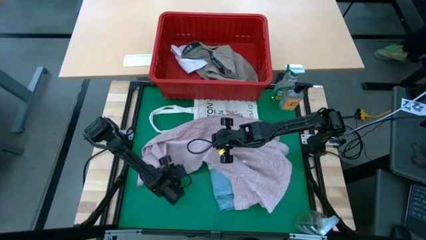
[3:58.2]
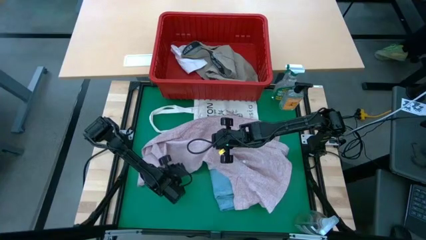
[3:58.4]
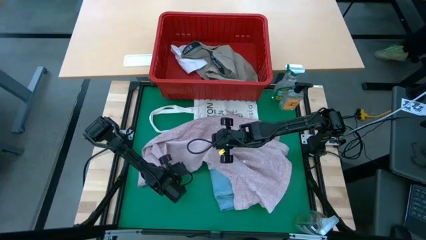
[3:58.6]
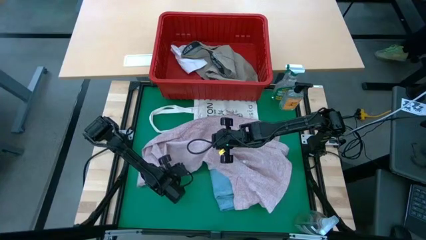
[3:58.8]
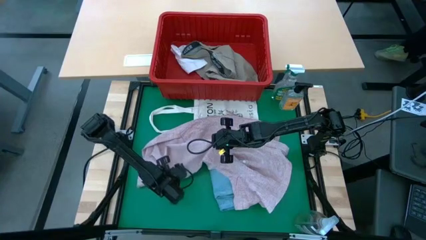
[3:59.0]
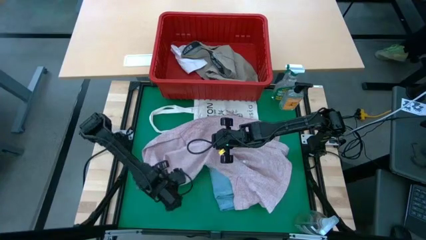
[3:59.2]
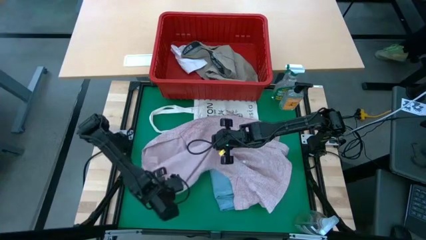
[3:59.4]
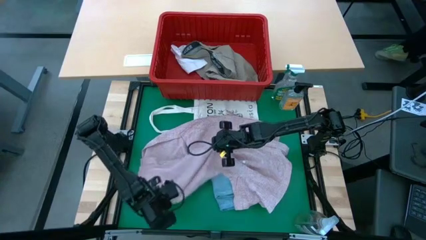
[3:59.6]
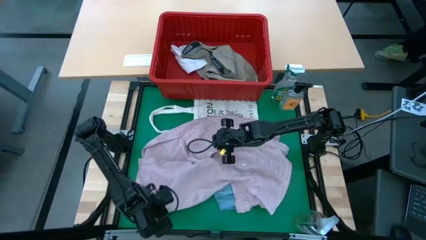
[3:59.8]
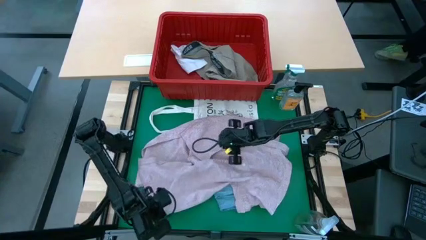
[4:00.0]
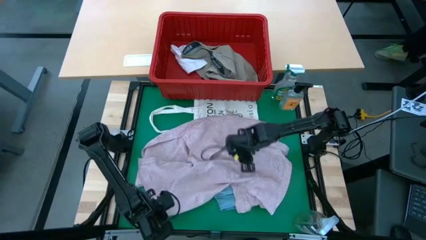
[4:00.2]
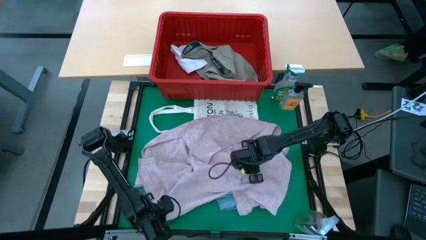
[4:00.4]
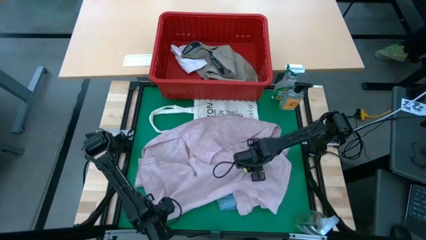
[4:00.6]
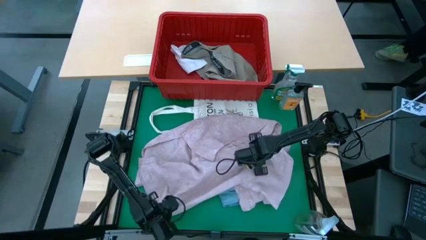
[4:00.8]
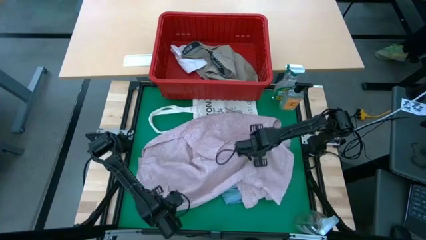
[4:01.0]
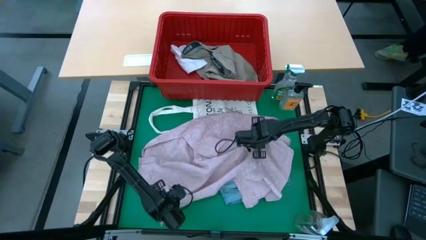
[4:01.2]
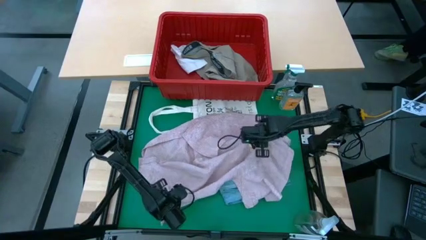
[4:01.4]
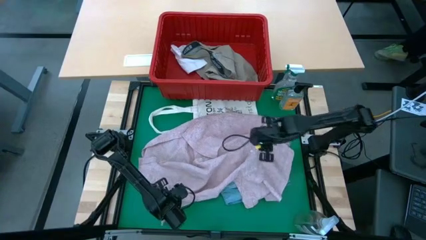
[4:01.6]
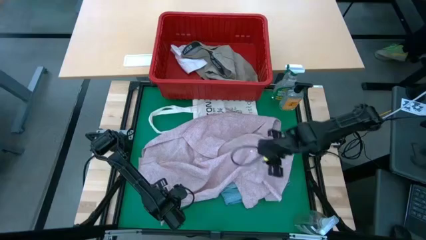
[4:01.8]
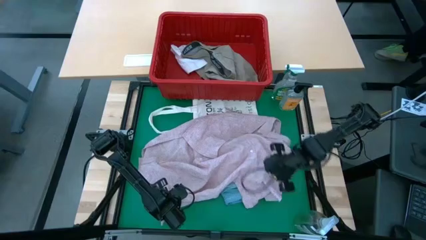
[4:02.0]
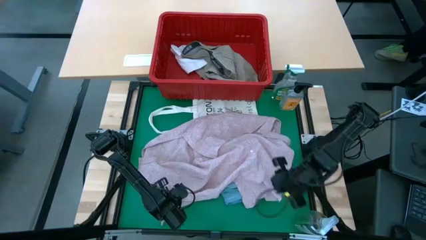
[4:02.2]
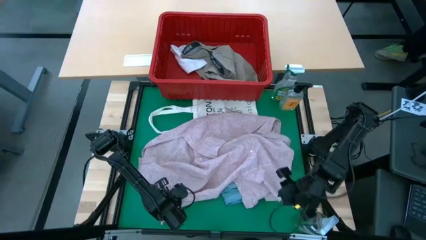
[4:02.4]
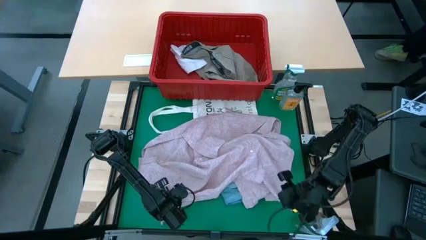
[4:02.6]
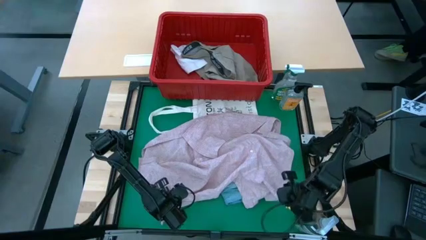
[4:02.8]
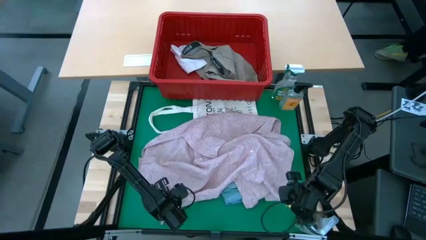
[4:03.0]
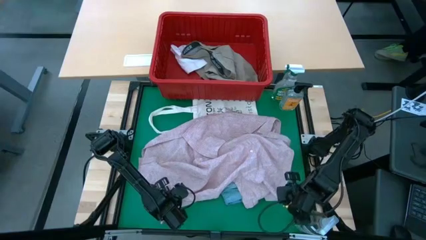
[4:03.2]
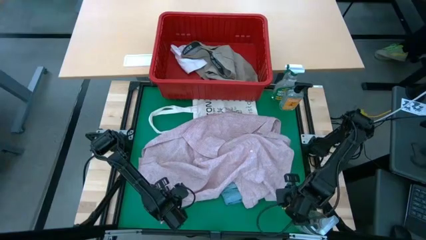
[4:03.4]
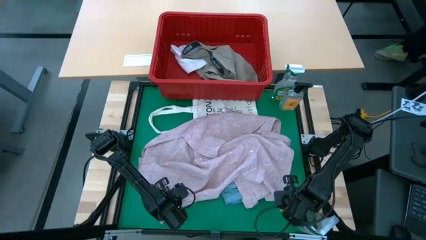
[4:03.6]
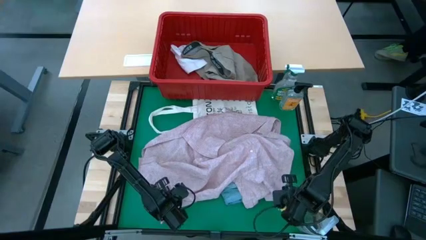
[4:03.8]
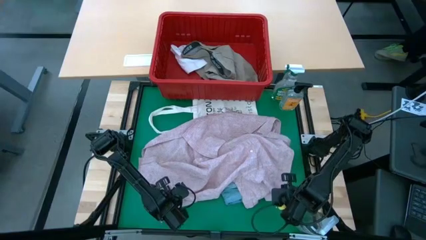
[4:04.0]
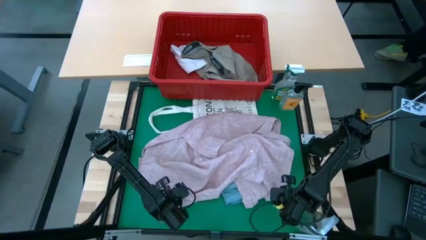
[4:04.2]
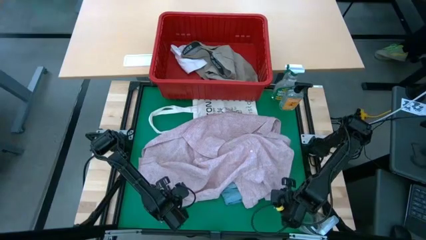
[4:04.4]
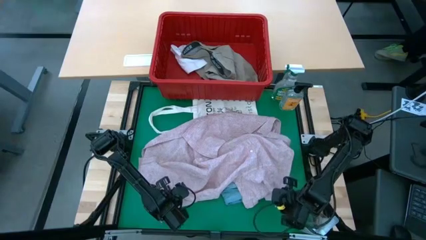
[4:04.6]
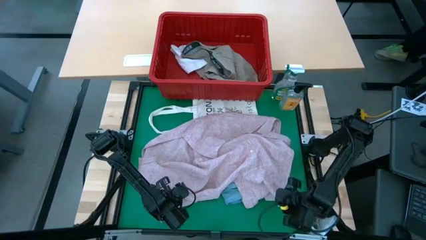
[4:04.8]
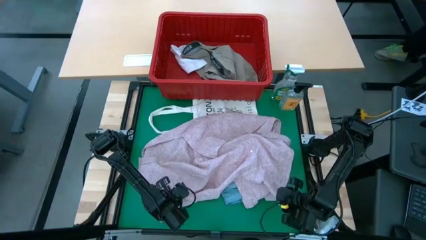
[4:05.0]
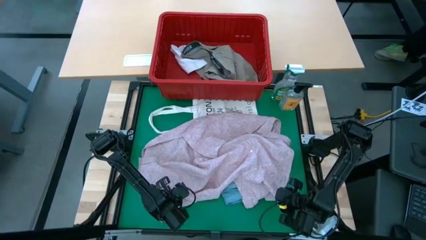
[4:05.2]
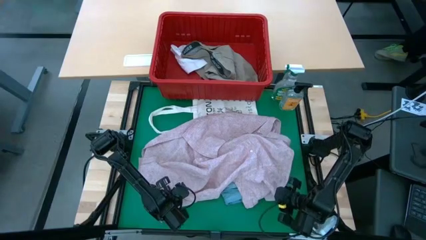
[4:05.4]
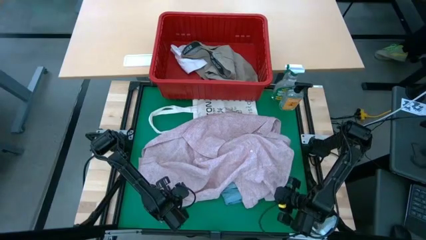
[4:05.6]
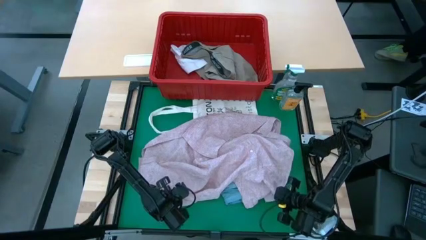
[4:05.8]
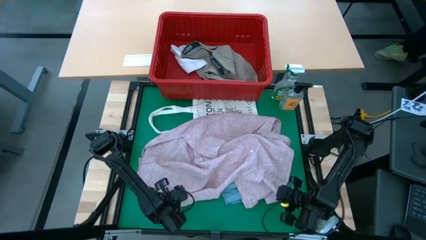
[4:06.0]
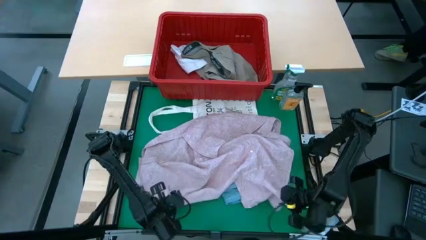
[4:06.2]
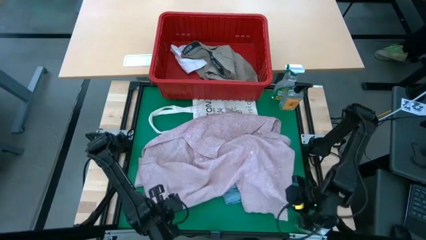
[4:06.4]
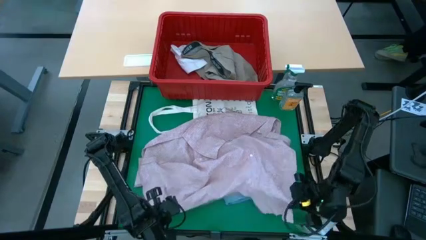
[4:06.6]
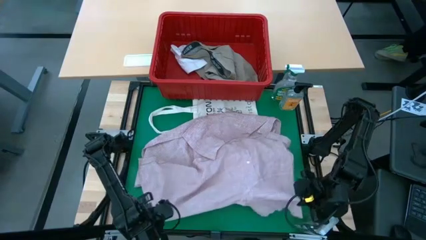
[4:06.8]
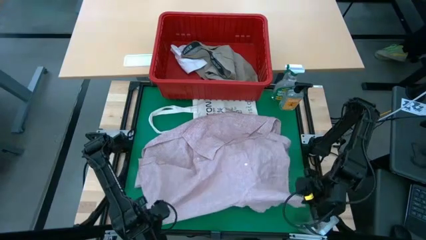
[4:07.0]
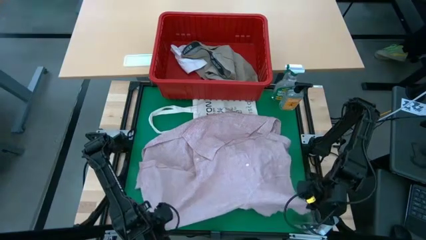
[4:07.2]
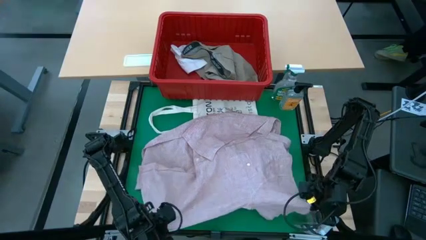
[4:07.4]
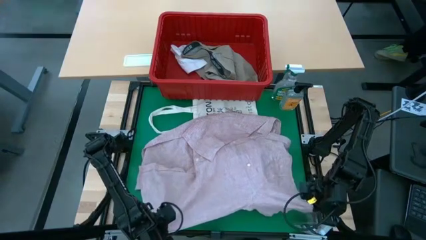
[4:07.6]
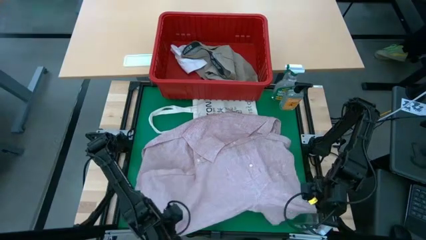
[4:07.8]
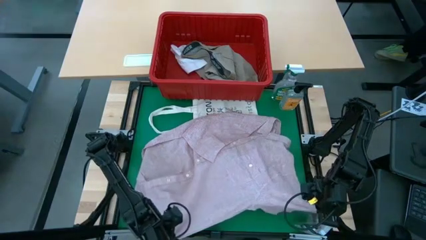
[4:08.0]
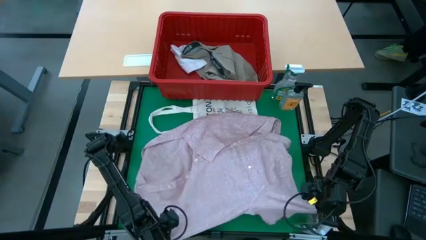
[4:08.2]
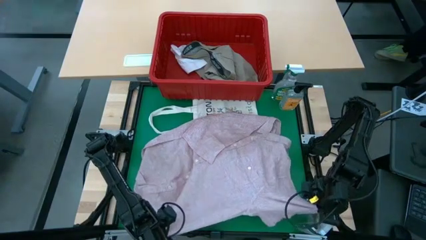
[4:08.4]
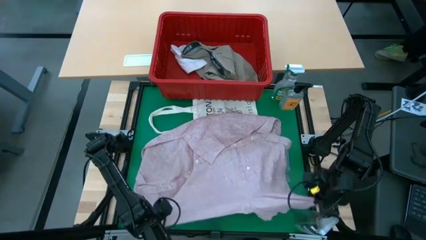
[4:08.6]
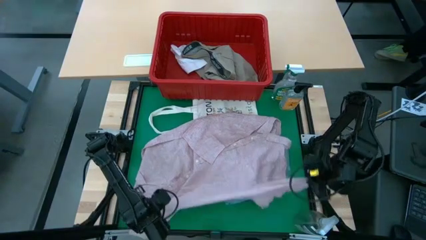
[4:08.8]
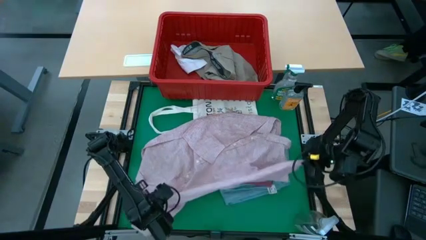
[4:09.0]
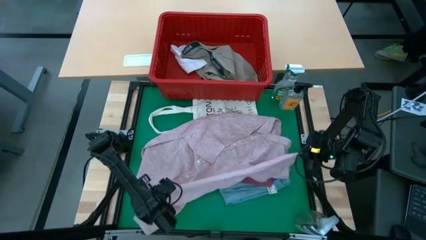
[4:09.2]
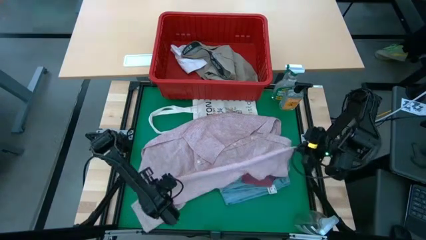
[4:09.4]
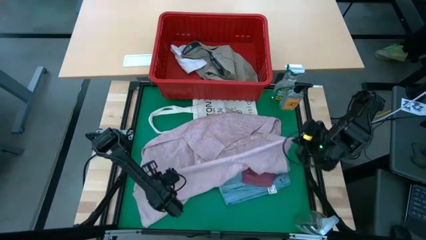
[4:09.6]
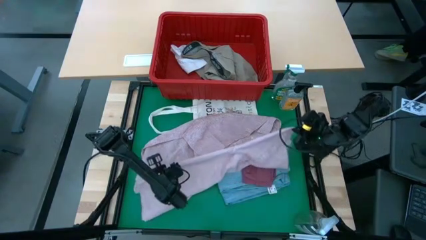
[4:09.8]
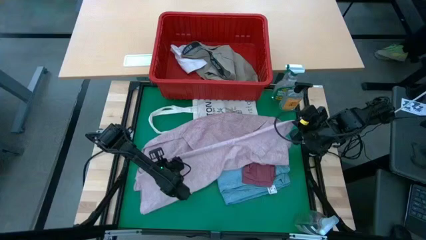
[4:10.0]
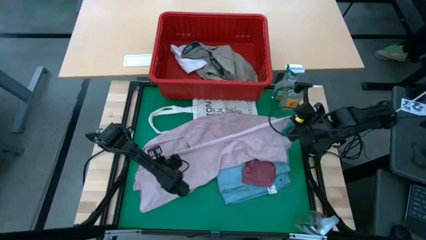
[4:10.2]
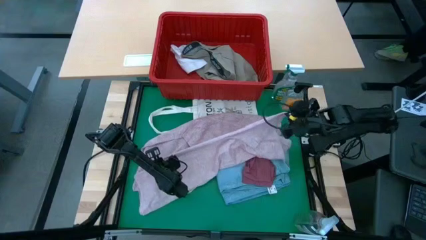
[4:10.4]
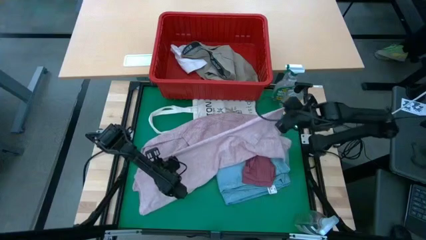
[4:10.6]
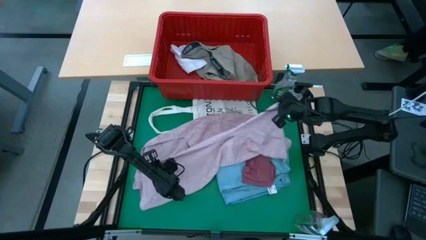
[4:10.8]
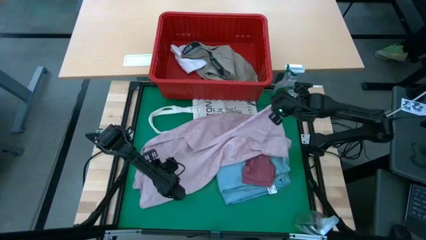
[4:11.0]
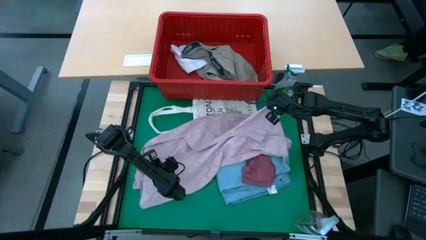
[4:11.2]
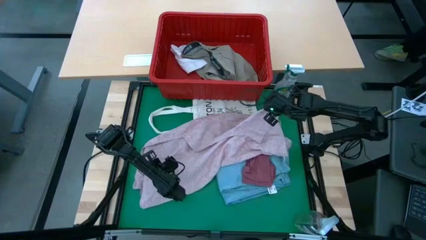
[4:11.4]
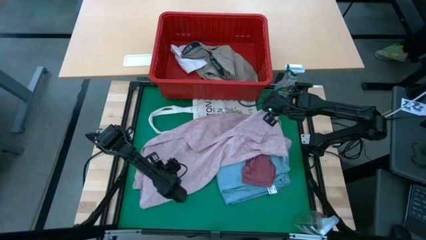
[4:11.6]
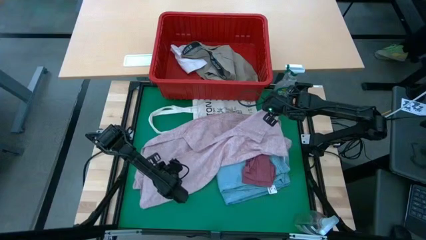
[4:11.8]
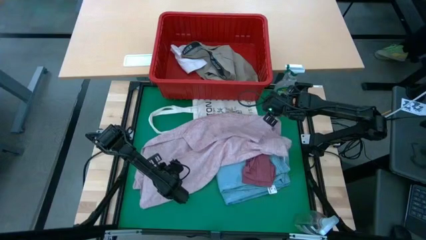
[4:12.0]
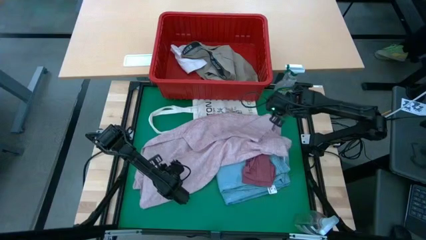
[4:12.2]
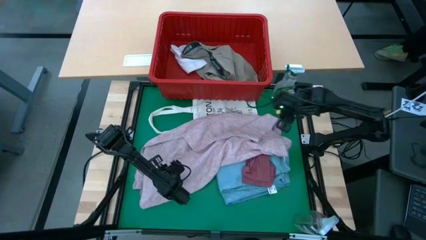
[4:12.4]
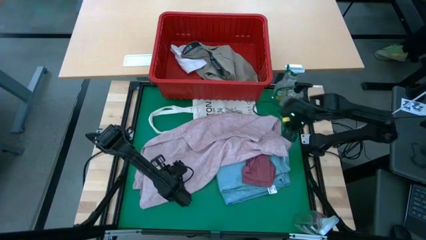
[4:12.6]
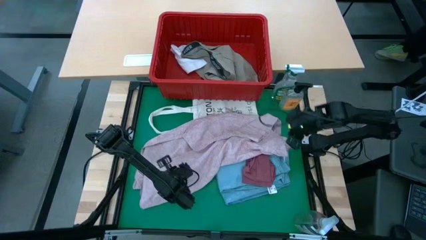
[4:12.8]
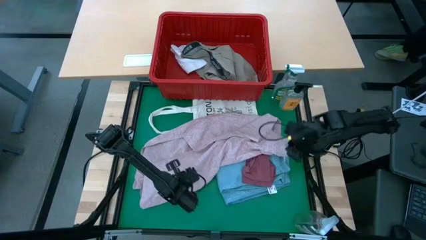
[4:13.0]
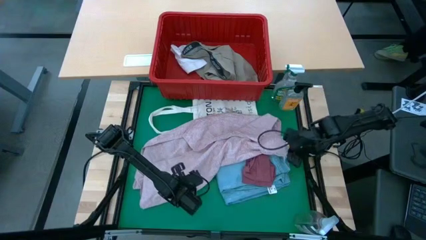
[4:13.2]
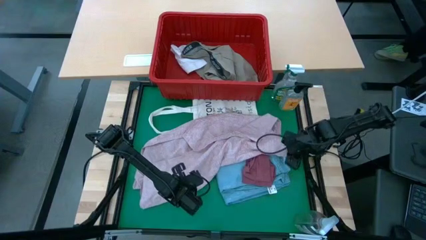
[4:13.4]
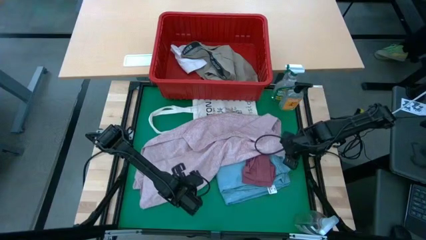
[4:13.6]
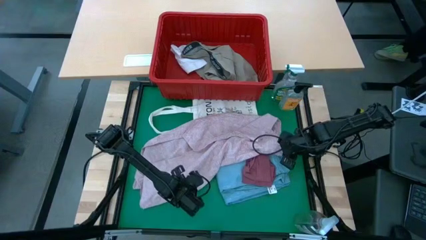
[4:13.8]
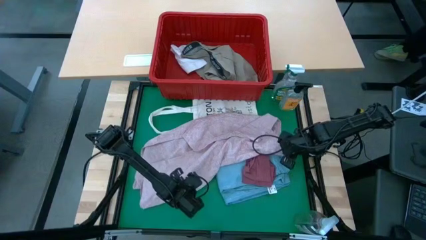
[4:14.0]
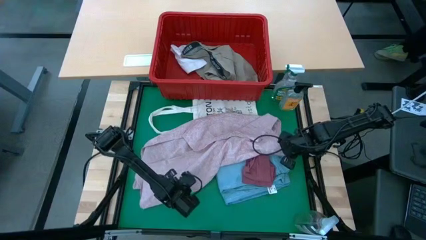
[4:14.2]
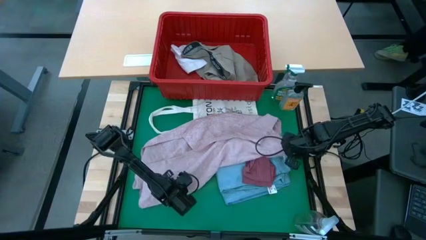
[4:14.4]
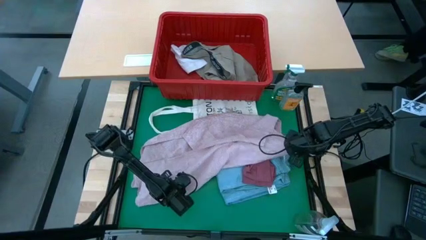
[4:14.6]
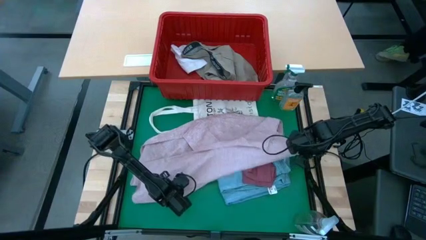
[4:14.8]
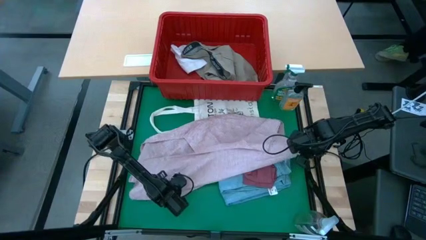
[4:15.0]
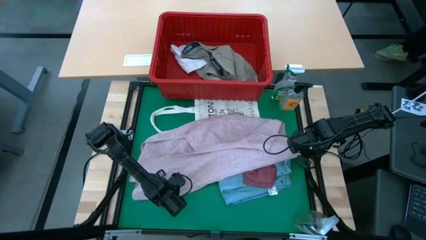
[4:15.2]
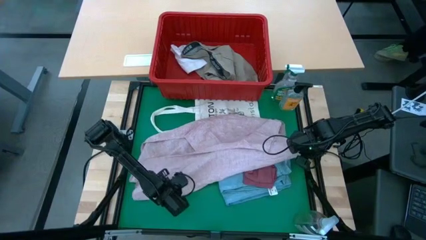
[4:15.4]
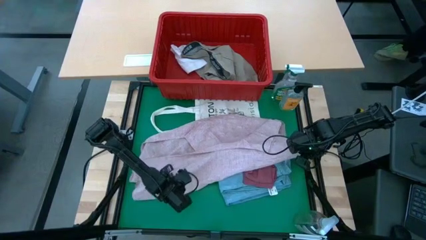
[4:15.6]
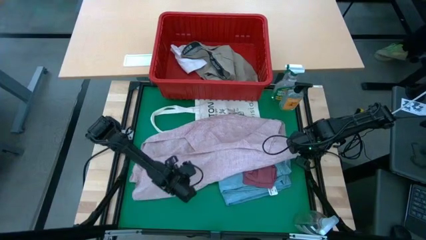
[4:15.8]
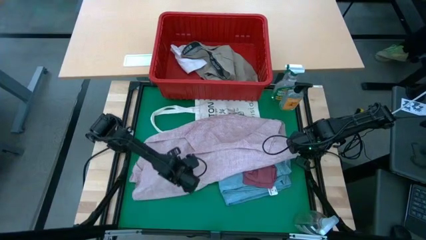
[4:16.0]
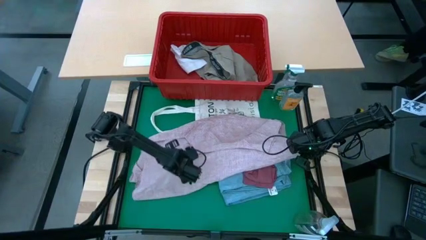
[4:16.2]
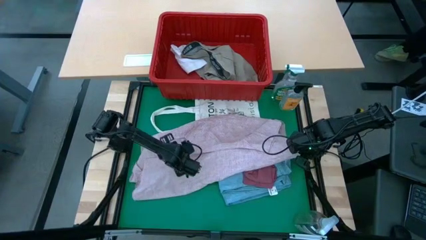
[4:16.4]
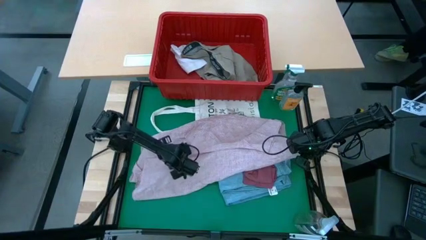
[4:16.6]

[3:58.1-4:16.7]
Task: Fold Laundry from Bin
Fold the pink shirt from the red laundry basket
